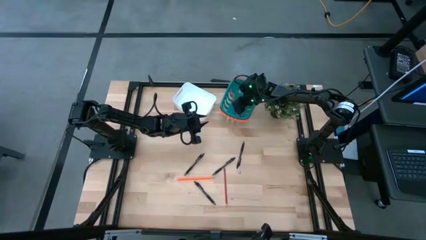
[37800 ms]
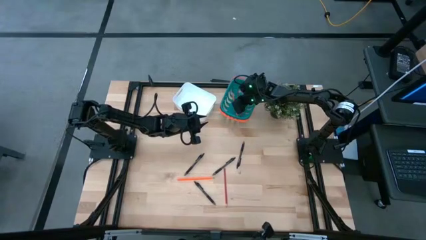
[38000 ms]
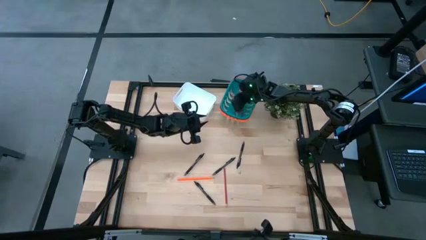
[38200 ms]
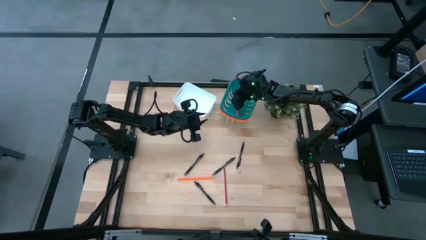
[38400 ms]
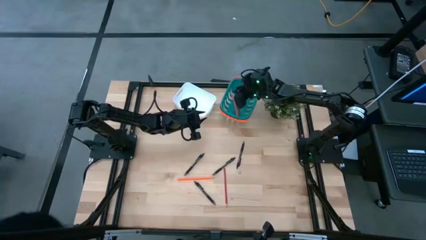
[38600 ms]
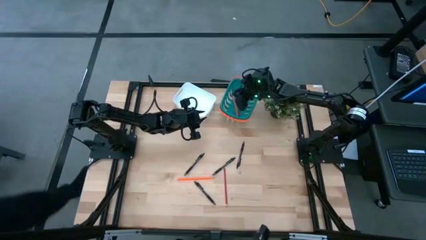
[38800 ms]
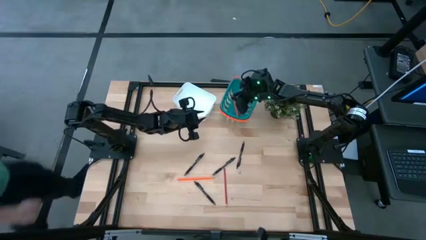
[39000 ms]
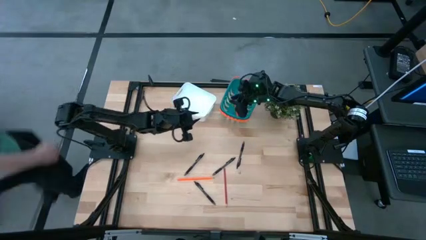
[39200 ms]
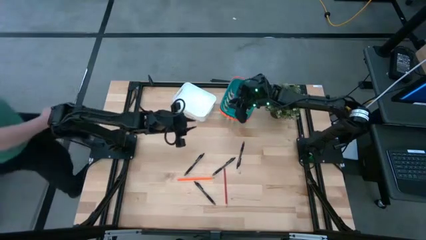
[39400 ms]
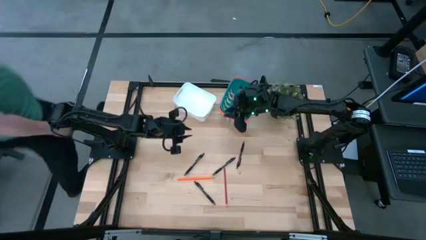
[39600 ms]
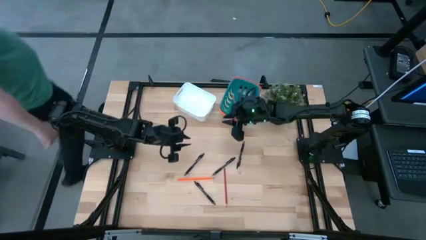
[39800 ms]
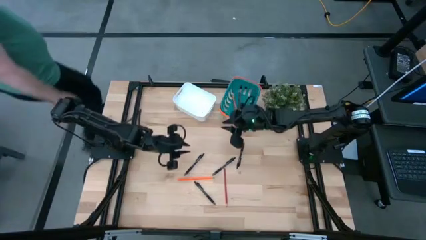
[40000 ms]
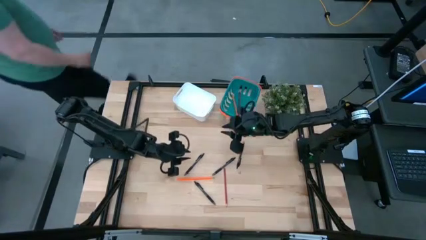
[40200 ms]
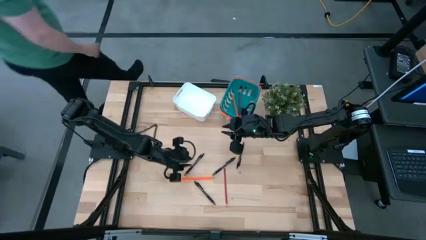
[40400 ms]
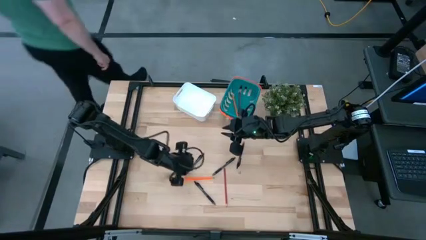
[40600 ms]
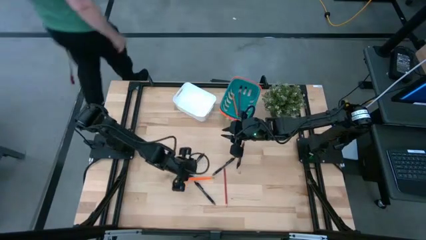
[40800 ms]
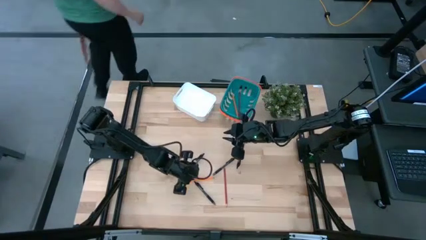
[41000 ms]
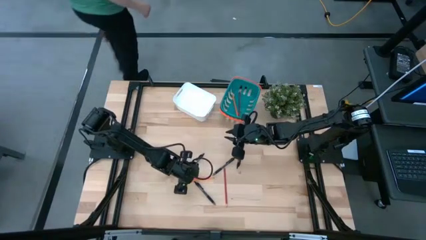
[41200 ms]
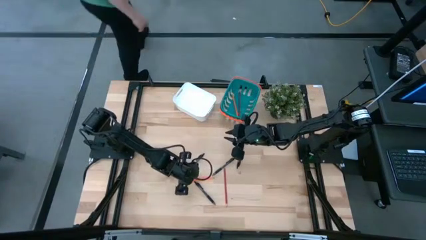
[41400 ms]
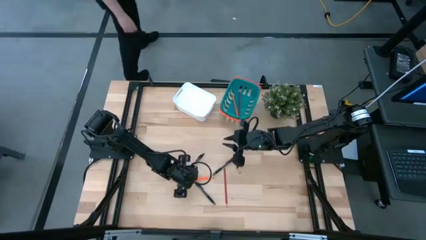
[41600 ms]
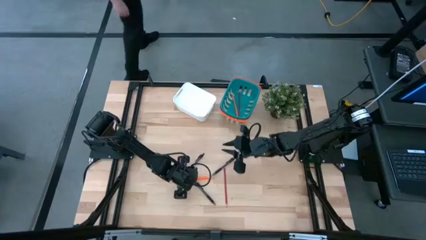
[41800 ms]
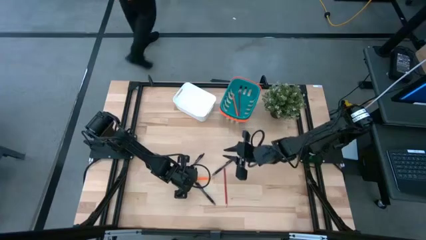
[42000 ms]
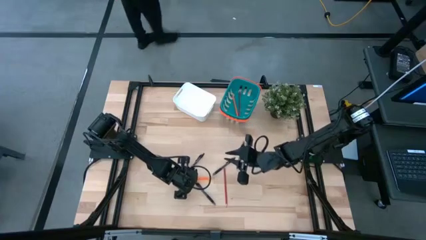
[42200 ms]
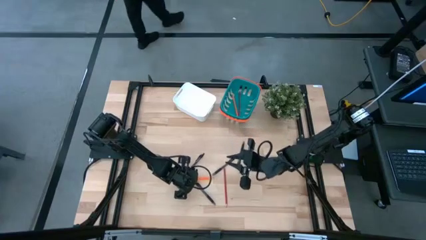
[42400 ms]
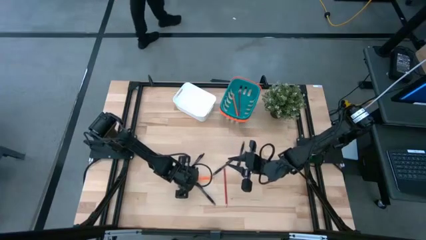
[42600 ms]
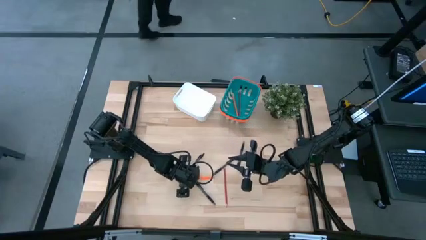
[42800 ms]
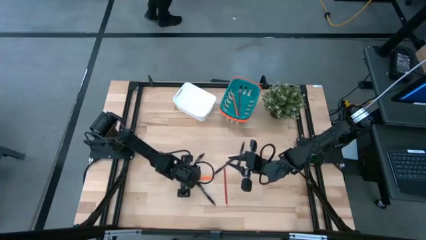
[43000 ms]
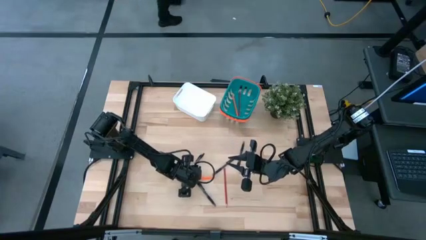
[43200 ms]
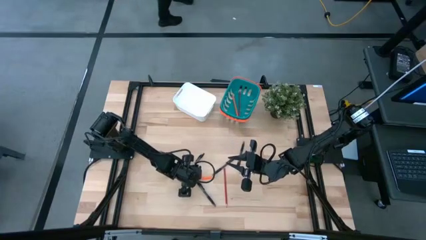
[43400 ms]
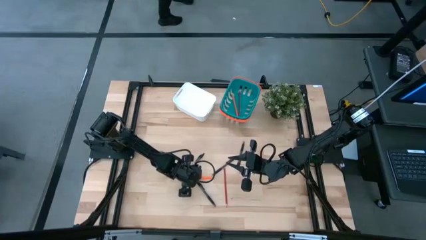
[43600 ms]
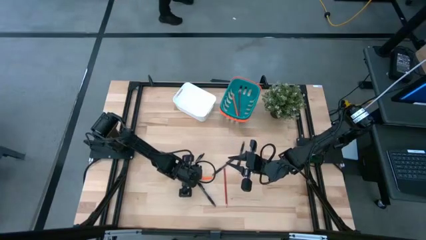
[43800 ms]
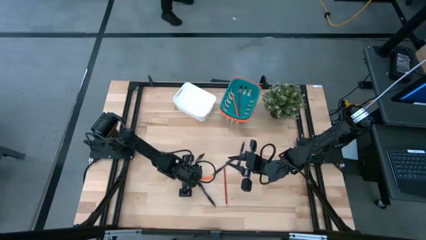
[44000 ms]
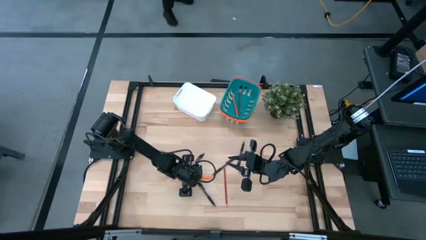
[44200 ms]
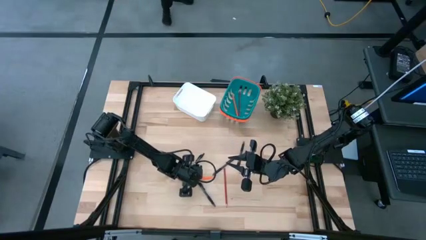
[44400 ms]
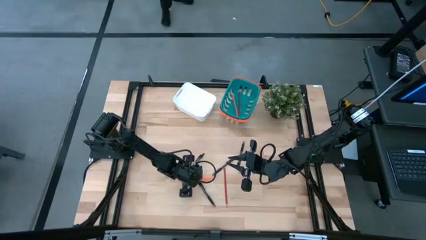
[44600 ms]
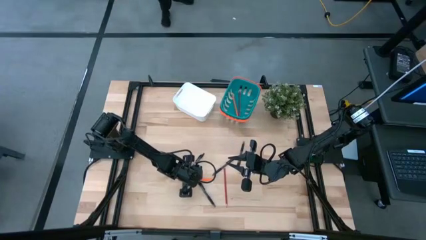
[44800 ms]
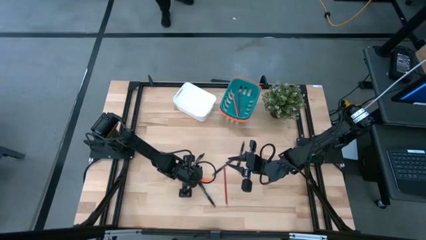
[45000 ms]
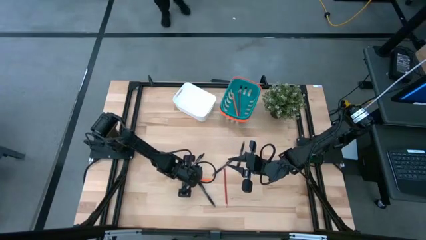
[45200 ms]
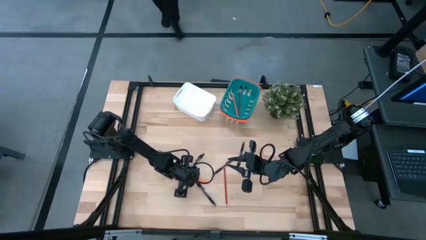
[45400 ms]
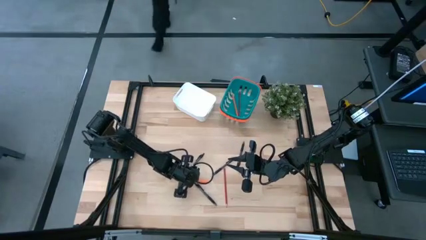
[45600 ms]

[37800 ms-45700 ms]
Task: Sort pens & pencils
Put the orange pencil into the green basket

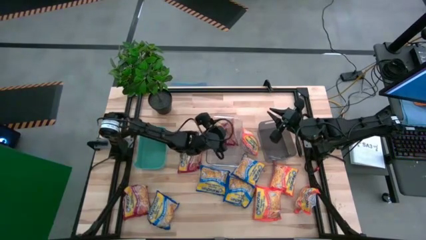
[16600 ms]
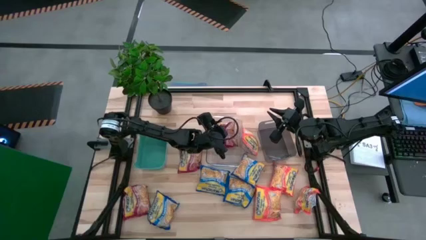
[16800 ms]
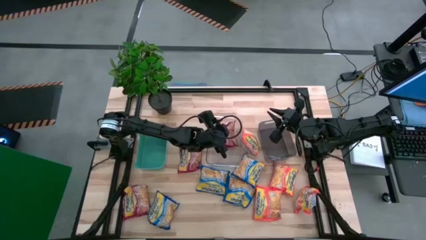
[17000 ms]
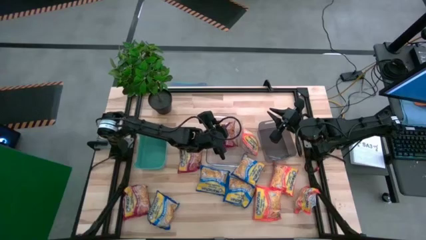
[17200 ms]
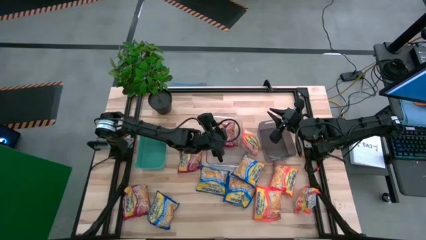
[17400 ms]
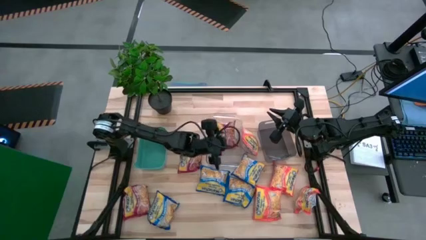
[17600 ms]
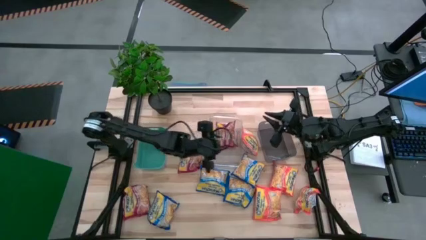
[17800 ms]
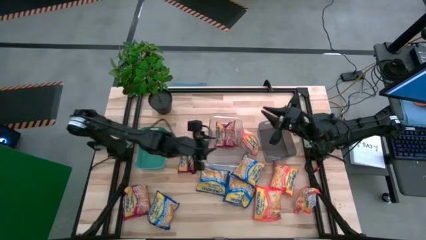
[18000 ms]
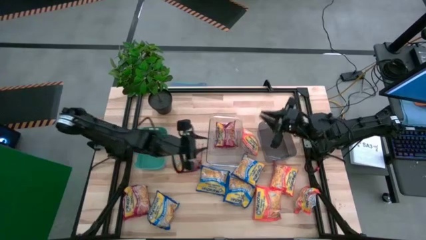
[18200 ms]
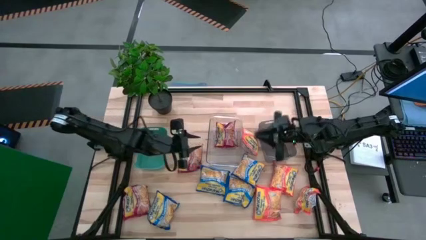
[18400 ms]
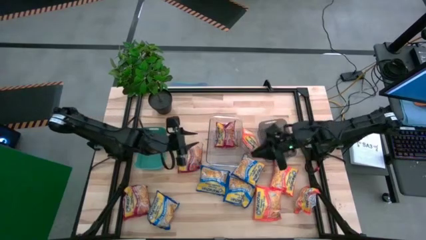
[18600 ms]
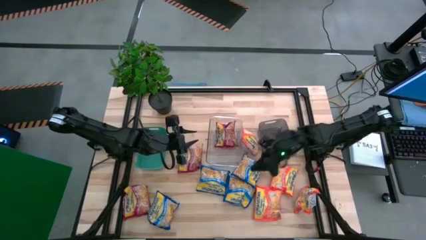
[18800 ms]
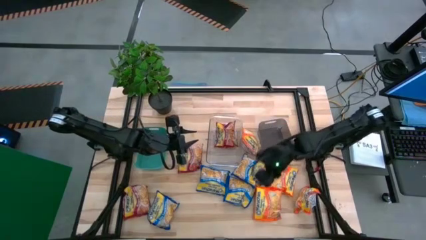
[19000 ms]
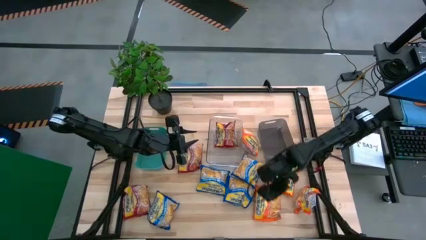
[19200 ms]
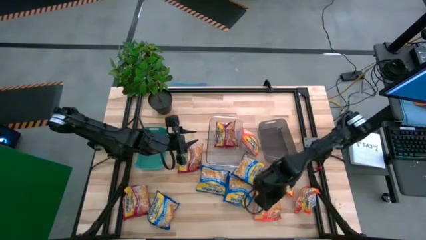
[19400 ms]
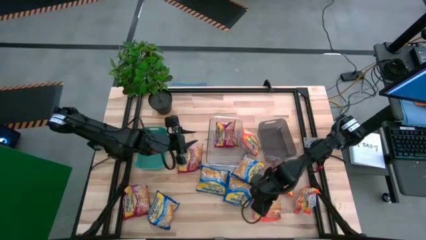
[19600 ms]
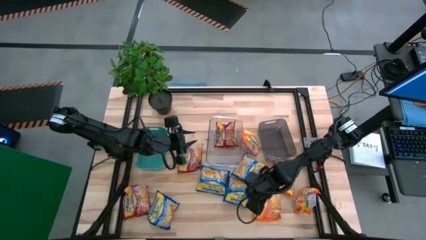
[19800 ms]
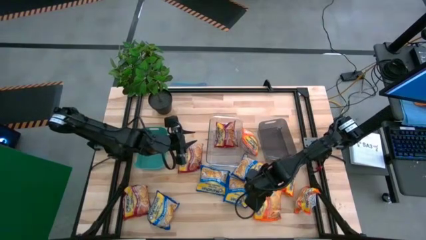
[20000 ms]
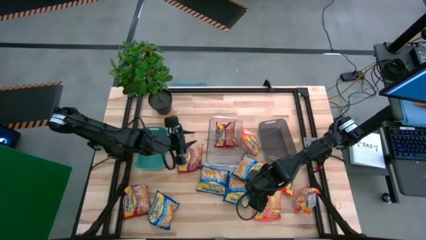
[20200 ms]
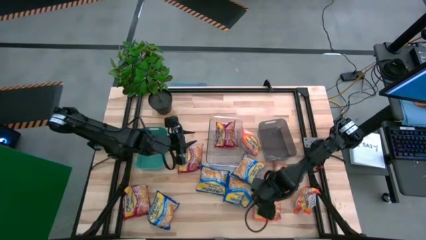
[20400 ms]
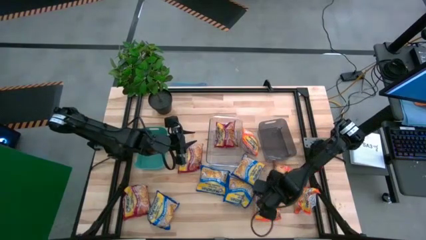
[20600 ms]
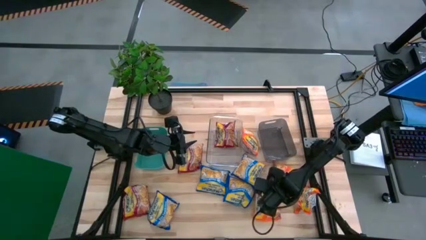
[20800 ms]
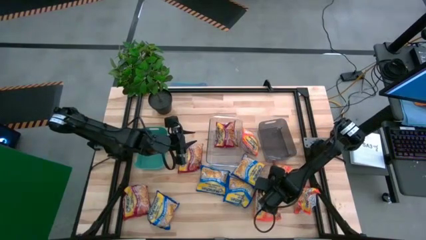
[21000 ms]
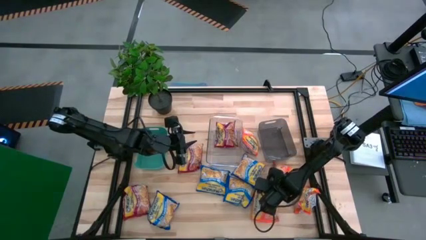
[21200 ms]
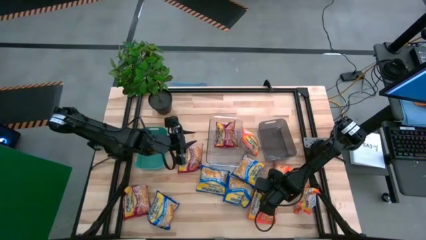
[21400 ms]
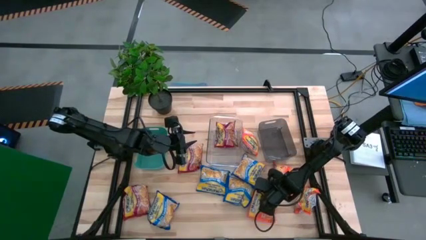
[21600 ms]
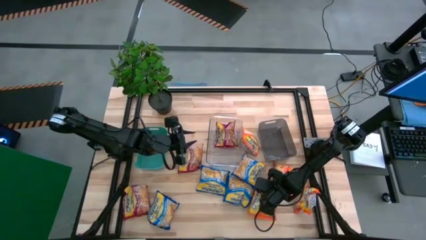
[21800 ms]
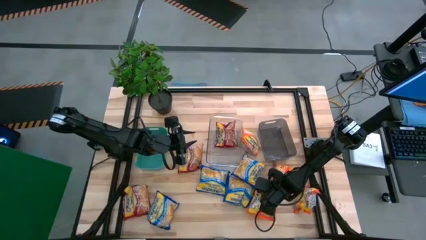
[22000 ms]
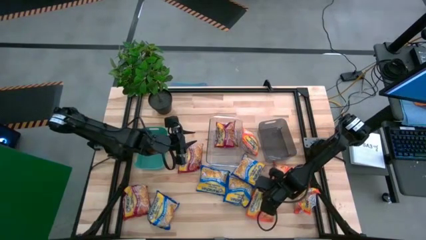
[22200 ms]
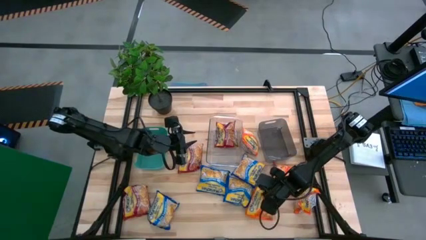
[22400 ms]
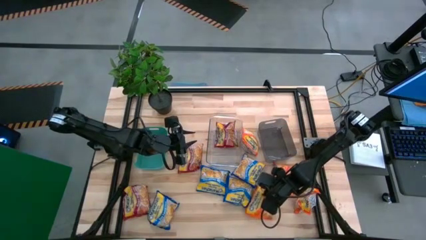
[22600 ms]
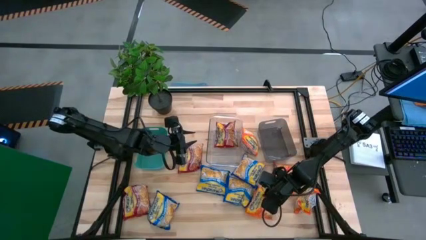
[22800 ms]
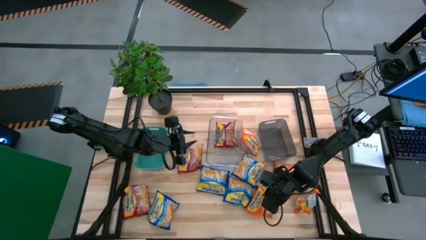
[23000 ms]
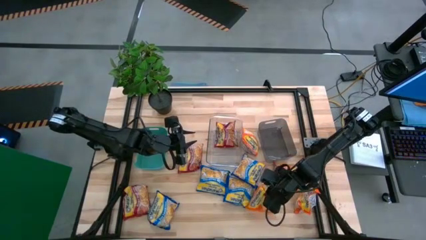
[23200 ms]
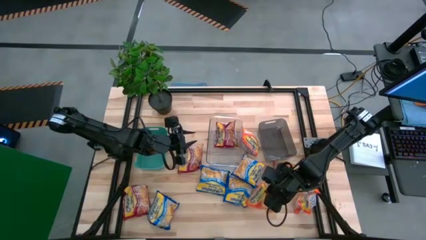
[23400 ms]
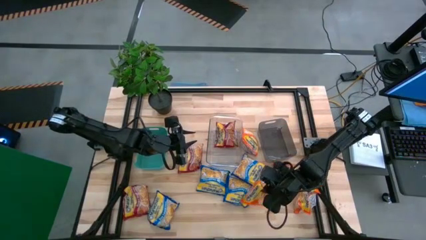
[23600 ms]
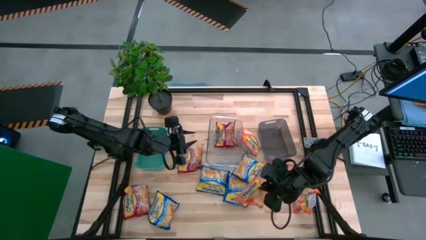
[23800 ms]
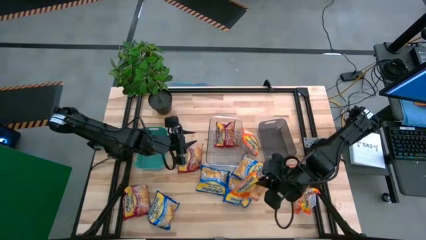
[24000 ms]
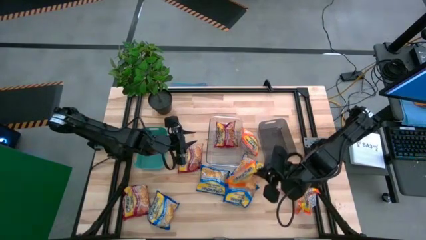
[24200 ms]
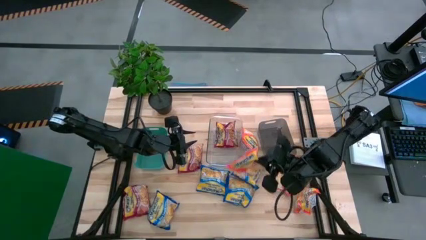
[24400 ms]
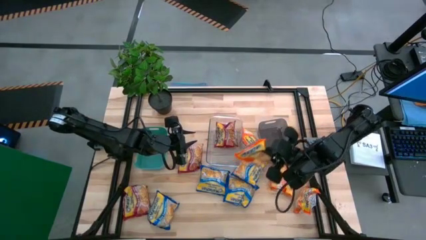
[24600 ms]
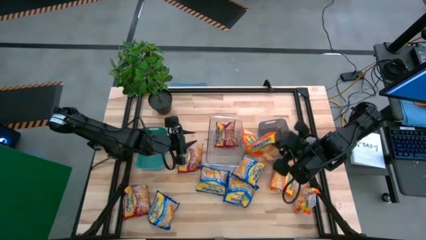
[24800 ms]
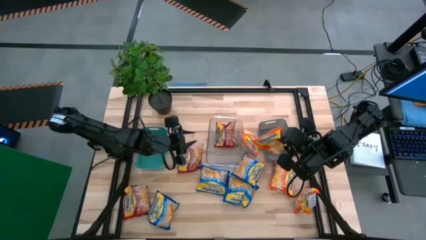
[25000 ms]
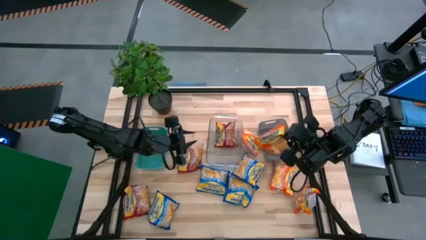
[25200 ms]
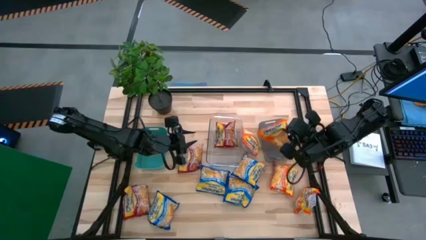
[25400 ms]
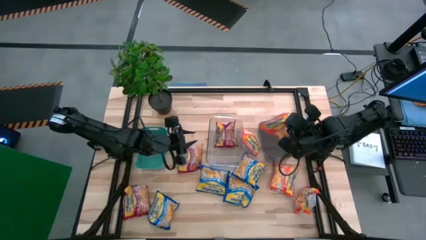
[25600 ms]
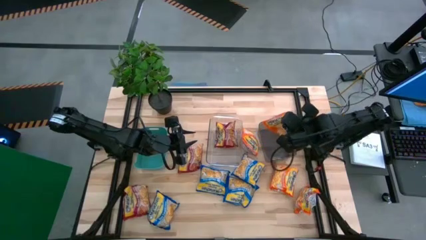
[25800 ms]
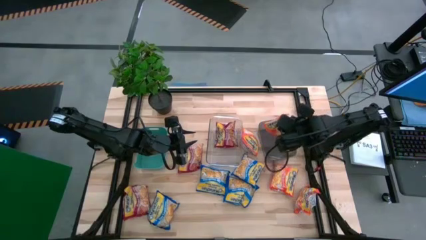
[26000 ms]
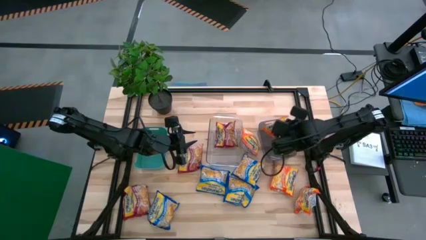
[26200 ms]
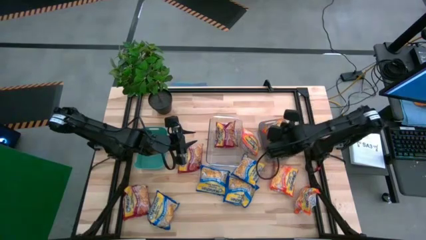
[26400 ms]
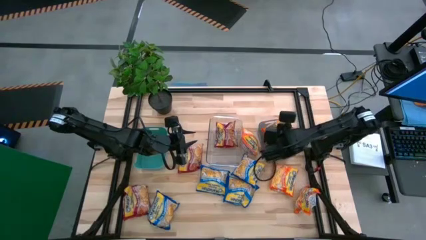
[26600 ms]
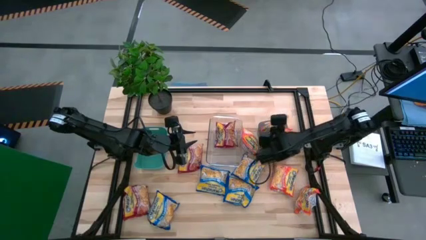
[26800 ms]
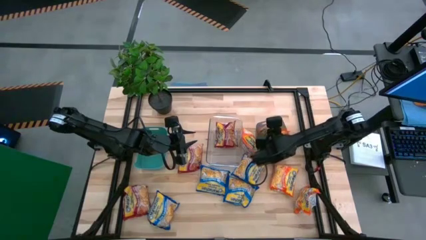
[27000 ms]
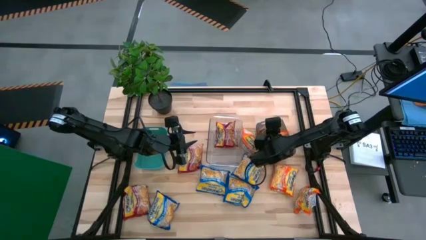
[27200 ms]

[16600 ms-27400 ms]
Task: Sort Maruchan noodles
Put the orange noodle pack into the black bin
